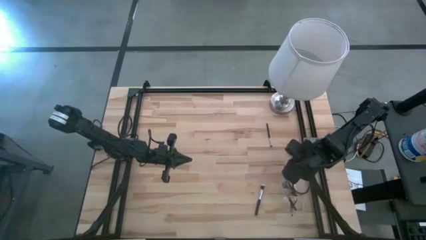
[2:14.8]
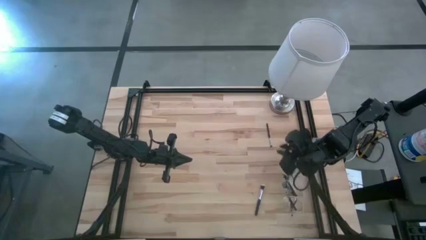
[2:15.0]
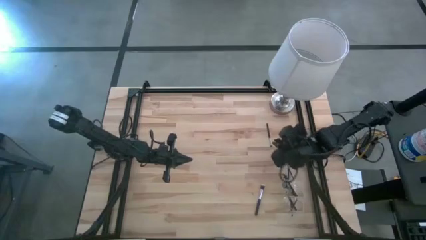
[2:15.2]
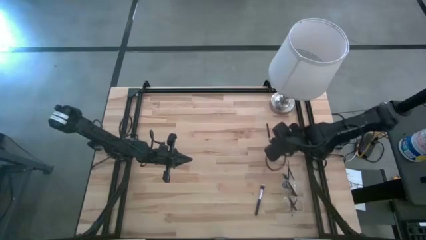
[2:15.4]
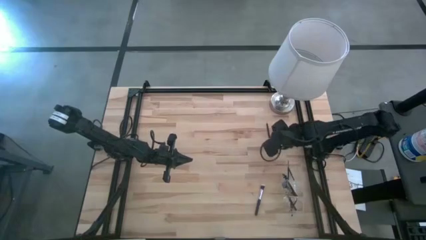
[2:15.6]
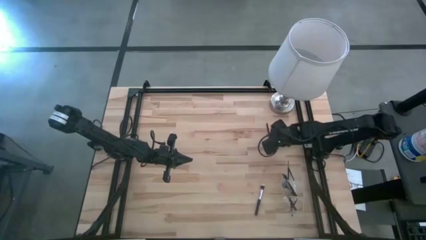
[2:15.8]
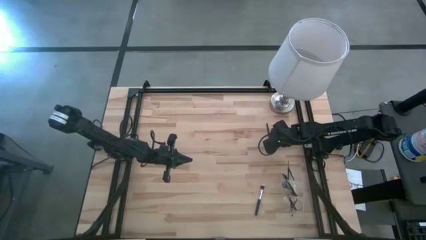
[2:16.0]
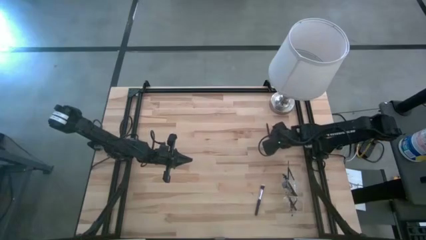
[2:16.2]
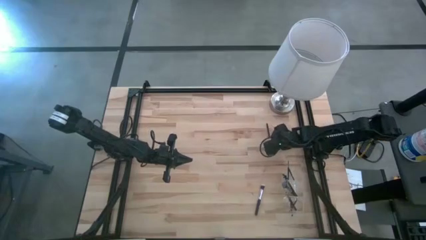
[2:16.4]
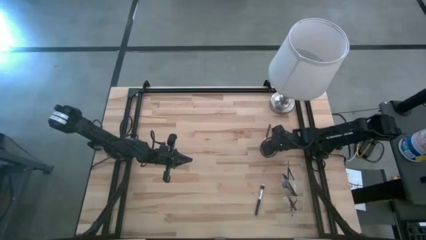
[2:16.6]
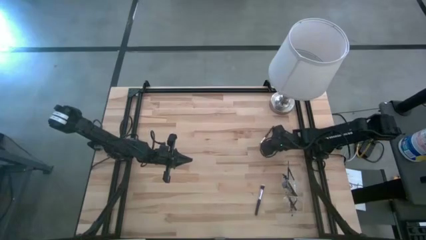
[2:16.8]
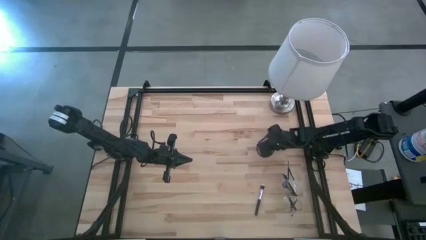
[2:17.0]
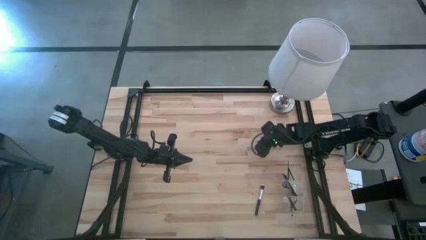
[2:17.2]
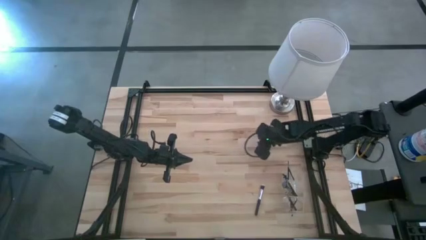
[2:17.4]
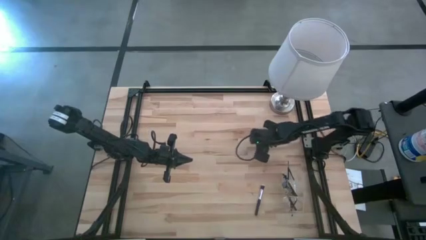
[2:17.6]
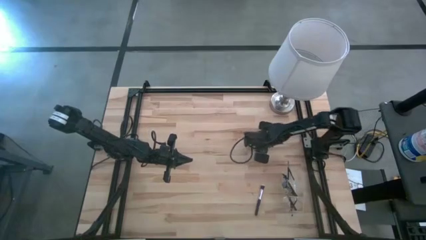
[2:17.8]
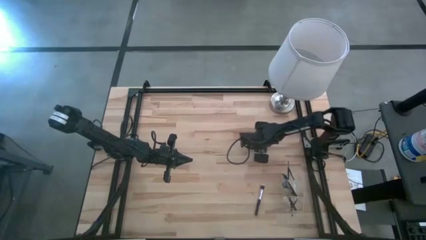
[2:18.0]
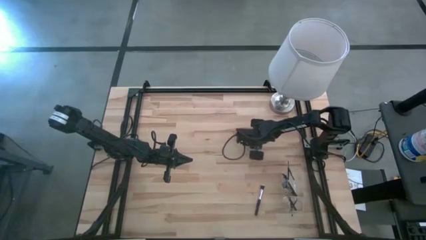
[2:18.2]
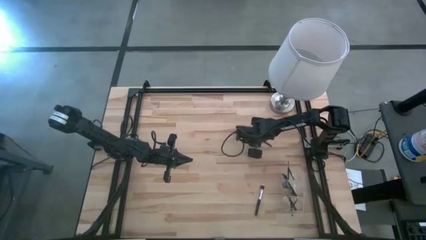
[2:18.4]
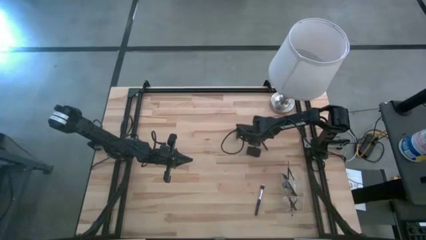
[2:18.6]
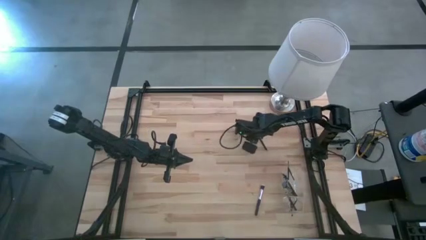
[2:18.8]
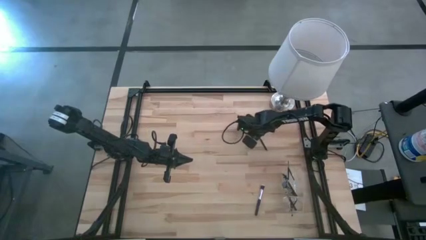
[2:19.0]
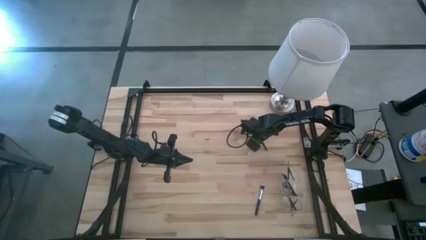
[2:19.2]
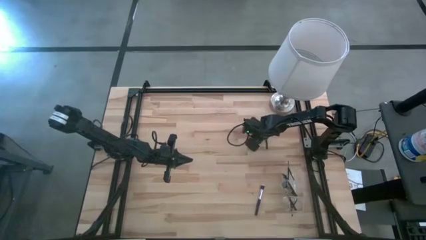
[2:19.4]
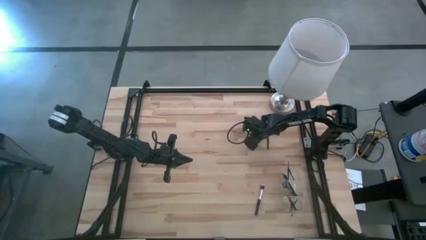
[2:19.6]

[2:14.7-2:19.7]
Task: Put items in baskets/containers
Put the eyeshadow brush into the transparent organizer

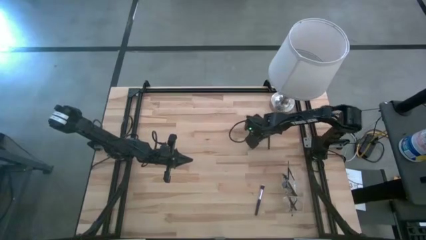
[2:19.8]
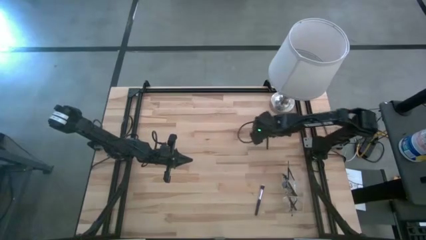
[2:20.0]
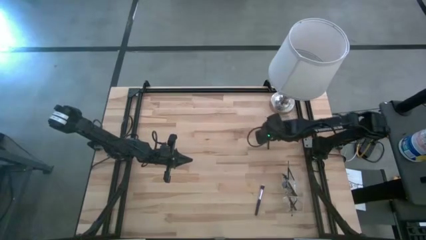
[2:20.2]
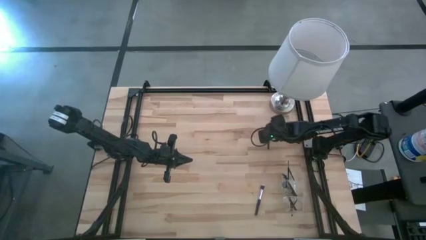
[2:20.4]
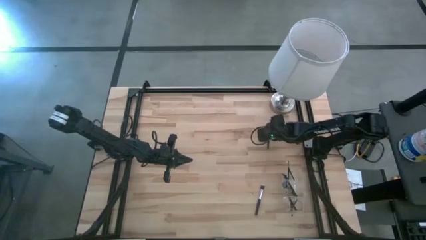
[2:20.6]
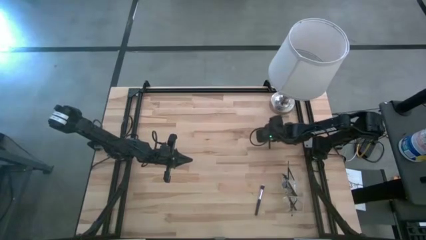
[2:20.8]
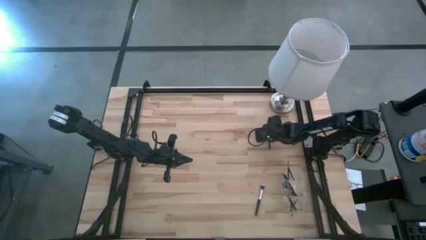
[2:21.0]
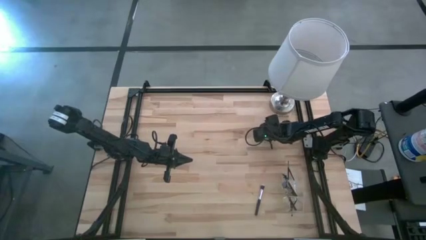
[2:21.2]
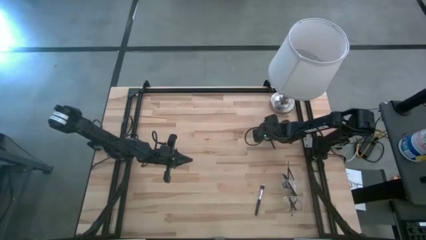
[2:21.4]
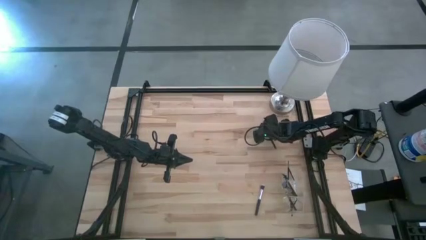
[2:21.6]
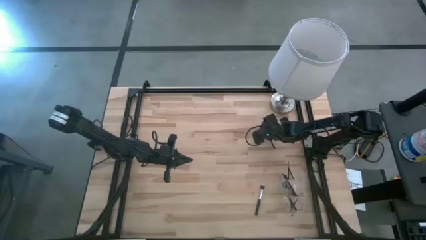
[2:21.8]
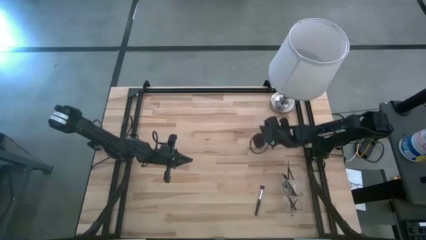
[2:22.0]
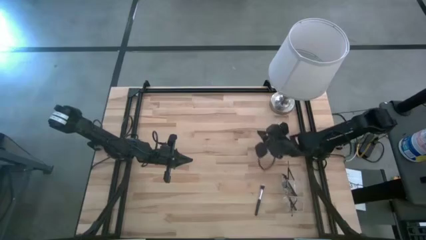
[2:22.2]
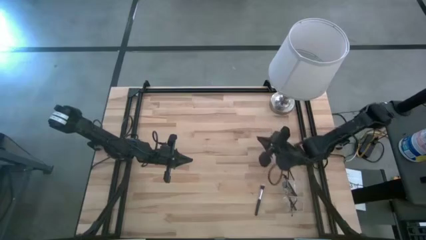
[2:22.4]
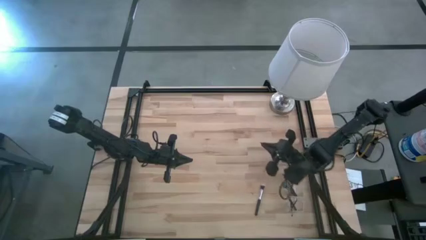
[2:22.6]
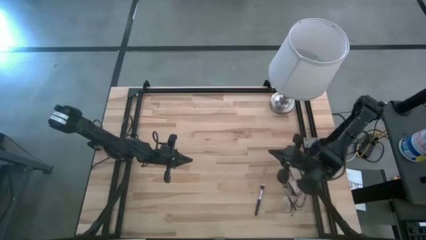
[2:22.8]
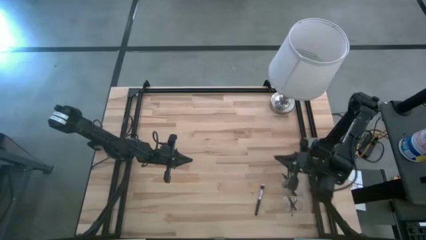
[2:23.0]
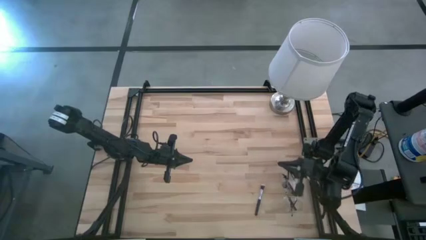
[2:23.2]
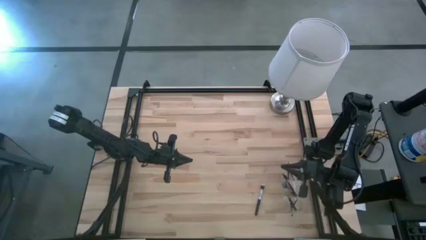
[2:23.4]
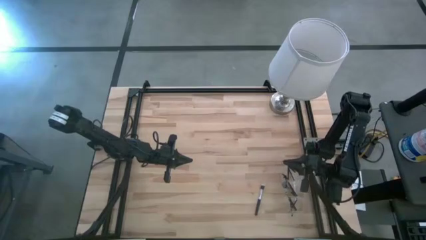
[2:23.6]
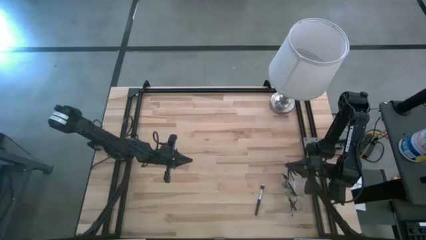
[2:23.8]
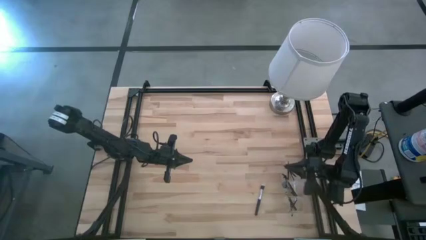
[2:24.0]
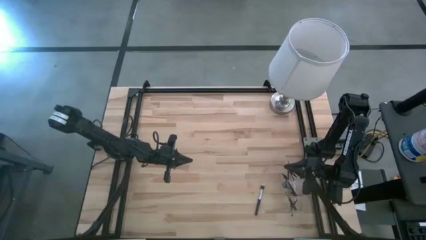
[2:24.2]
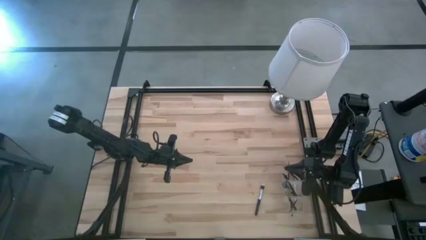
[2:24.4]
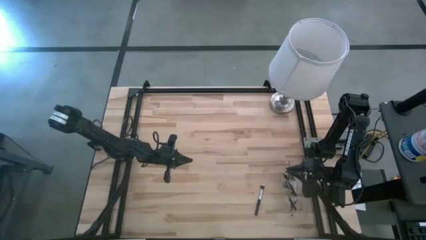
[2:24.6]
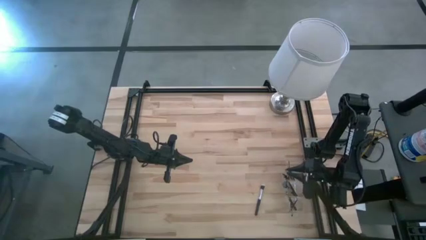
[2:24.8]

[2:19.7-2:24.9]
Put the eyeshadow brush into the transparent organizer
